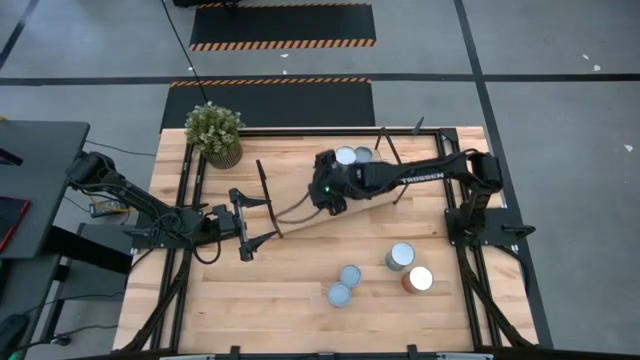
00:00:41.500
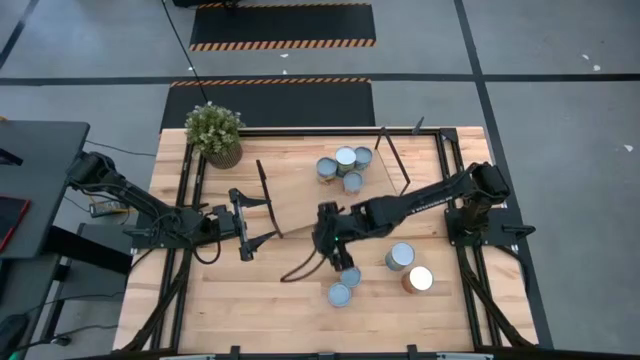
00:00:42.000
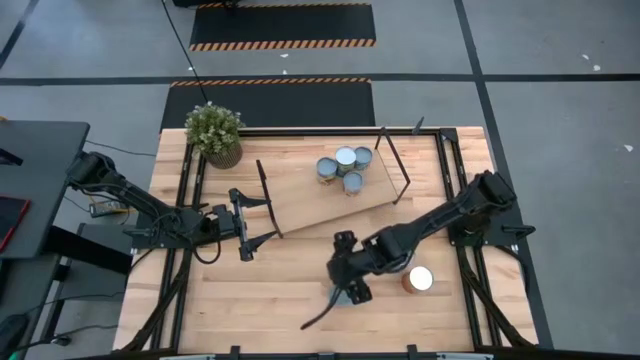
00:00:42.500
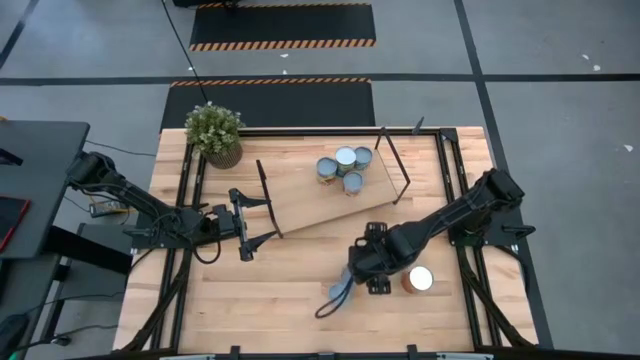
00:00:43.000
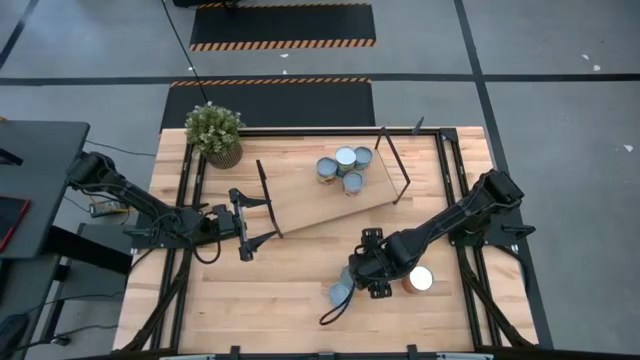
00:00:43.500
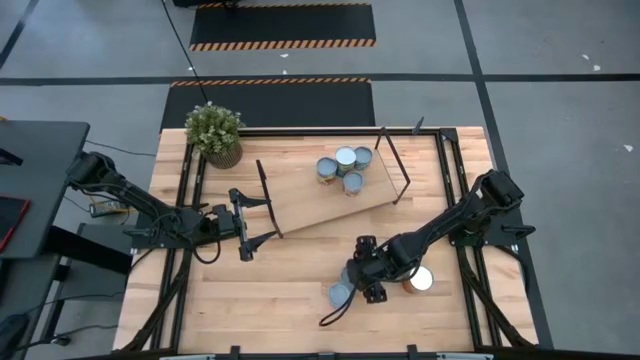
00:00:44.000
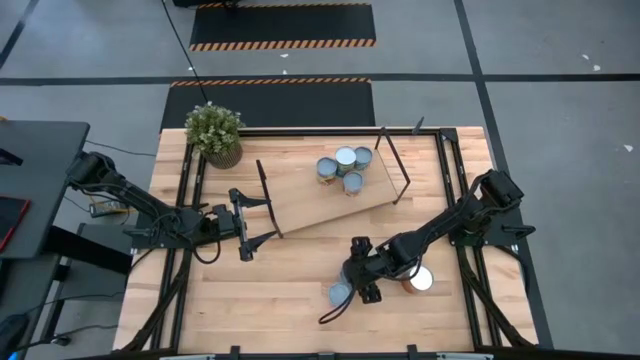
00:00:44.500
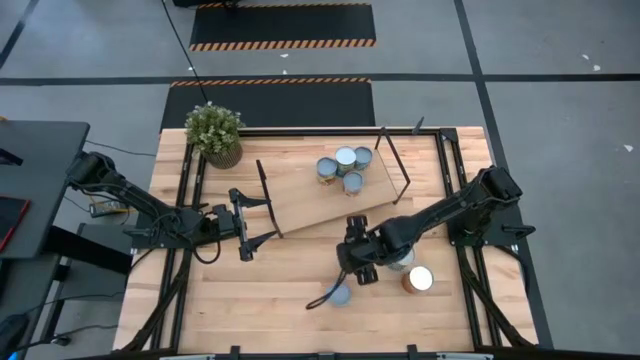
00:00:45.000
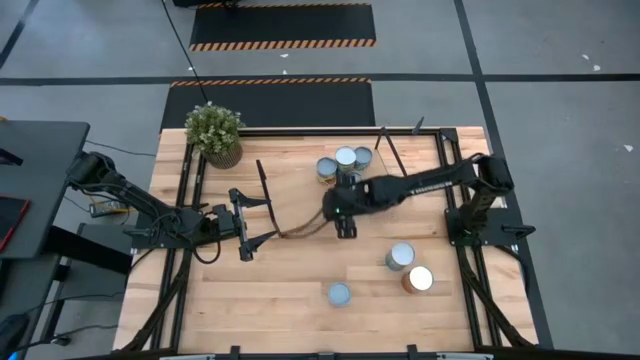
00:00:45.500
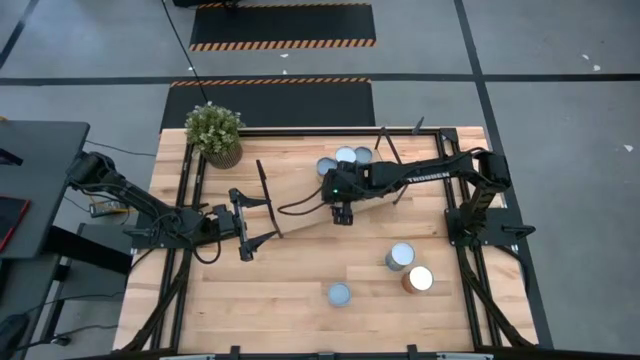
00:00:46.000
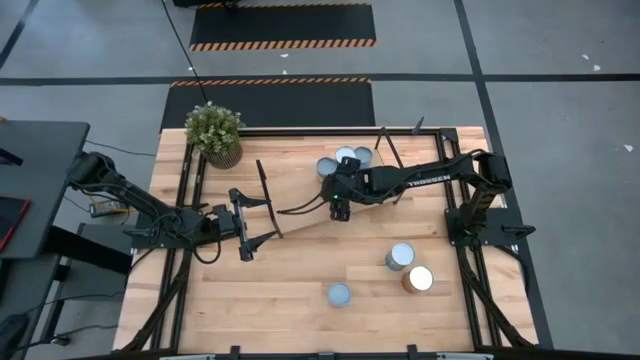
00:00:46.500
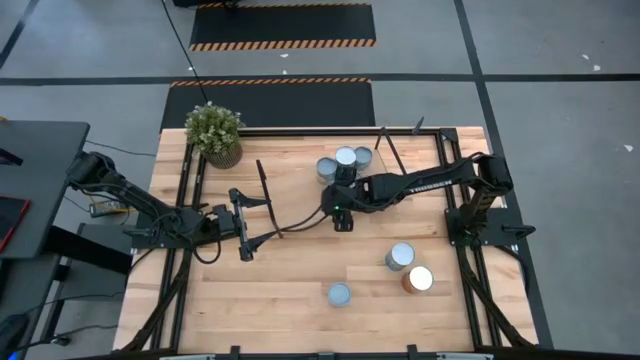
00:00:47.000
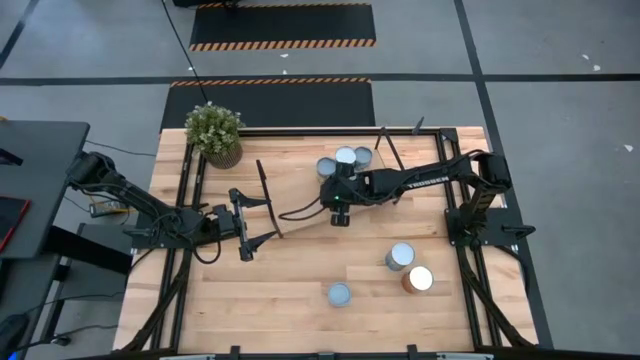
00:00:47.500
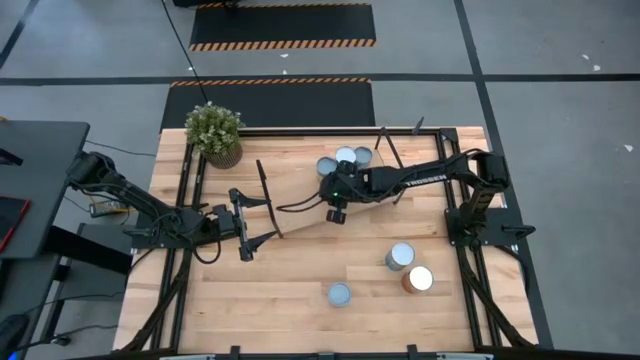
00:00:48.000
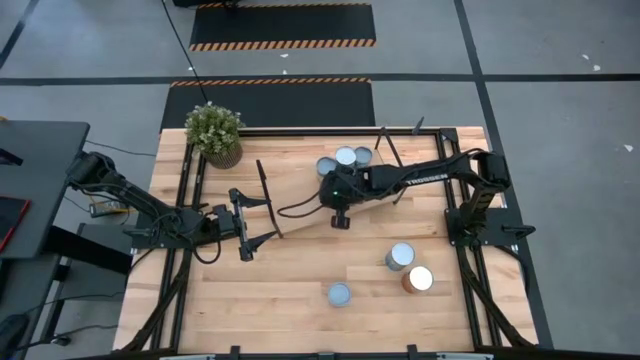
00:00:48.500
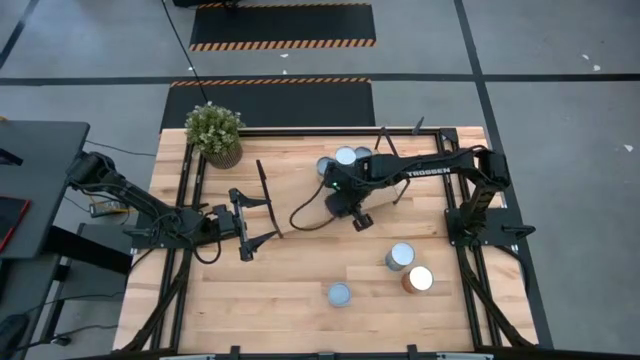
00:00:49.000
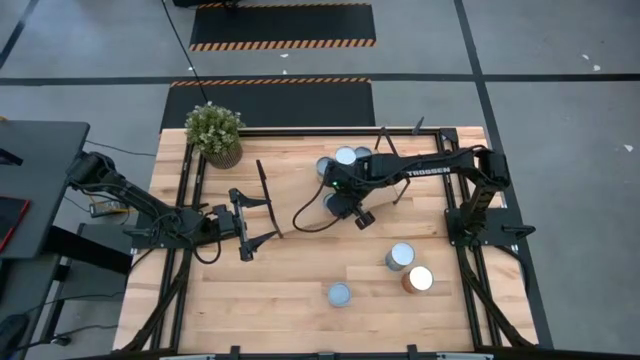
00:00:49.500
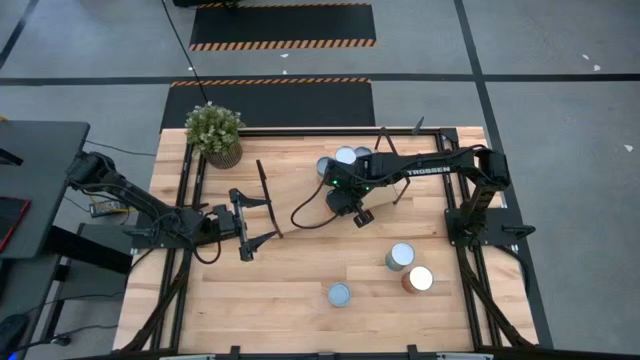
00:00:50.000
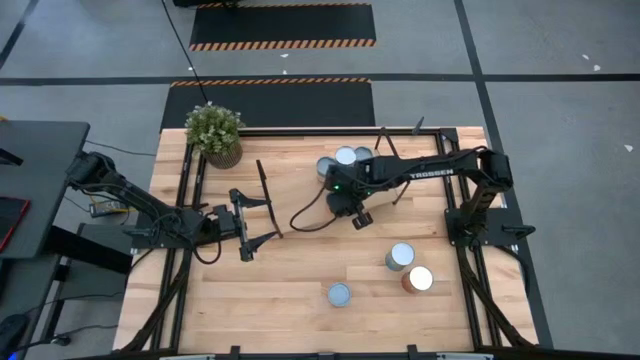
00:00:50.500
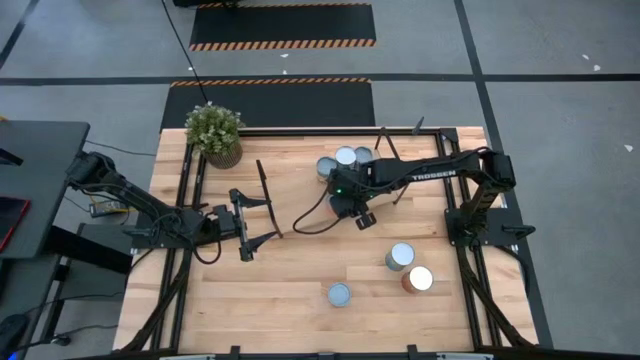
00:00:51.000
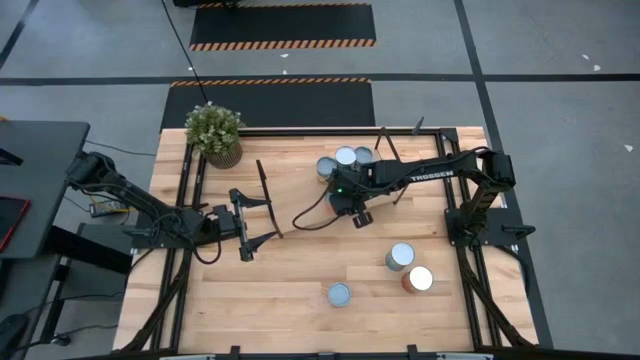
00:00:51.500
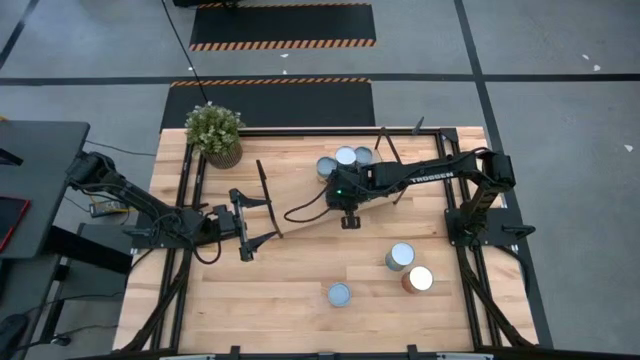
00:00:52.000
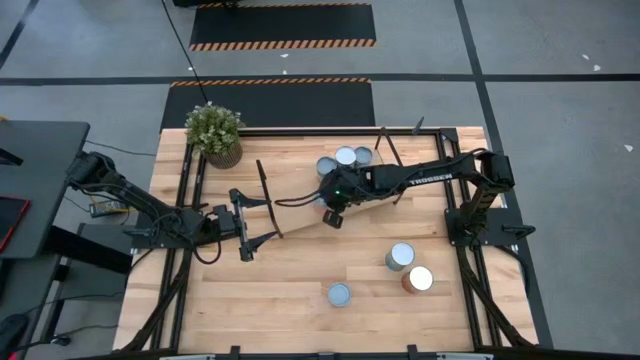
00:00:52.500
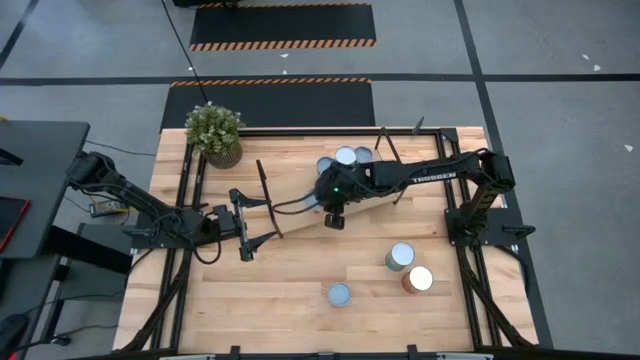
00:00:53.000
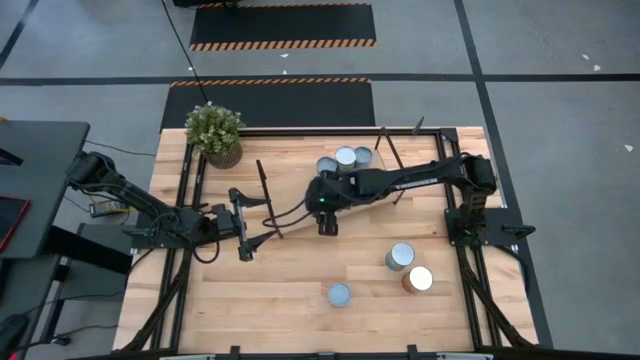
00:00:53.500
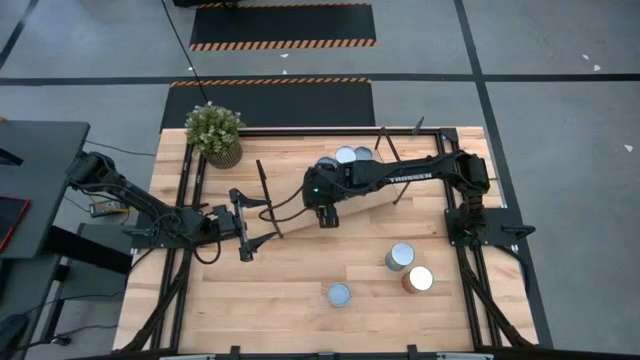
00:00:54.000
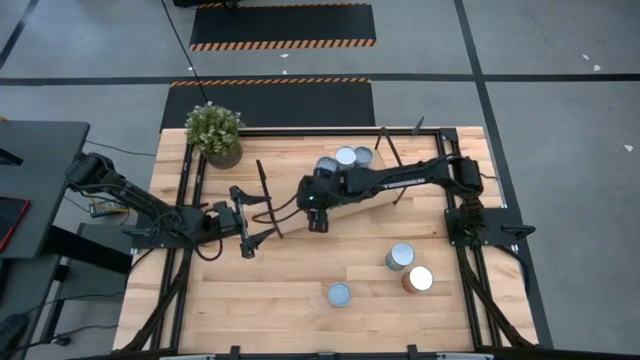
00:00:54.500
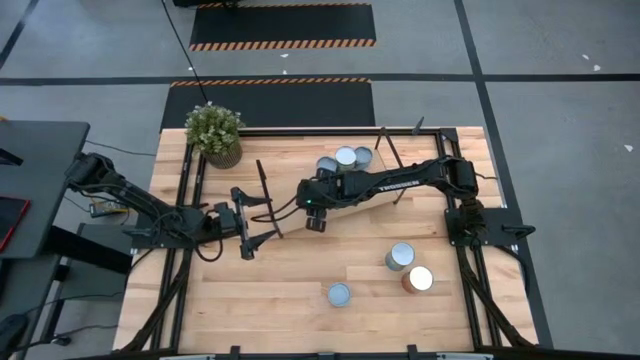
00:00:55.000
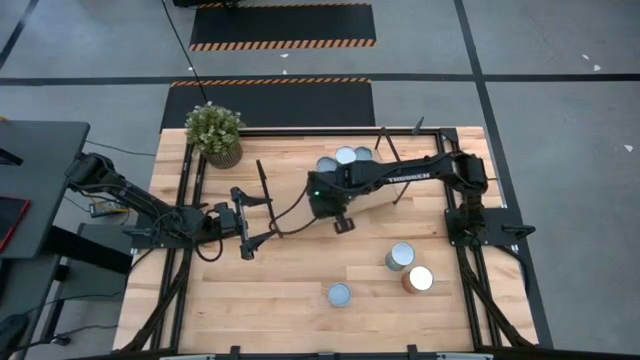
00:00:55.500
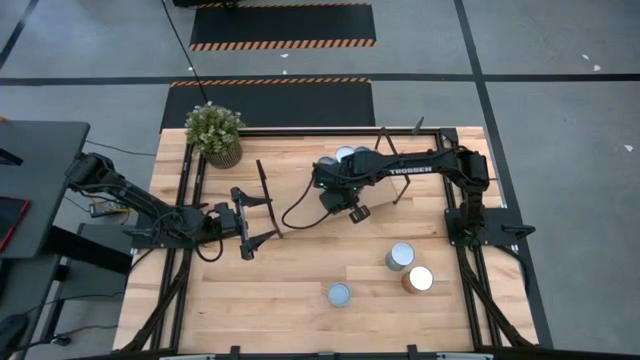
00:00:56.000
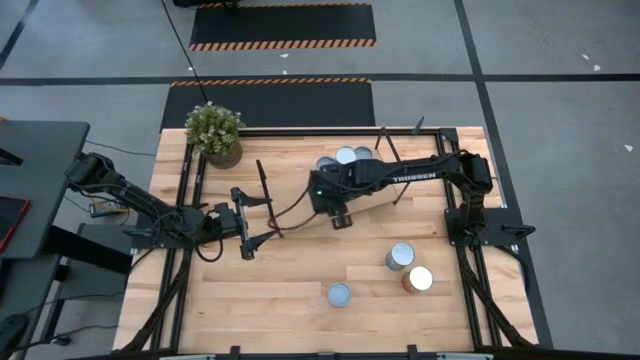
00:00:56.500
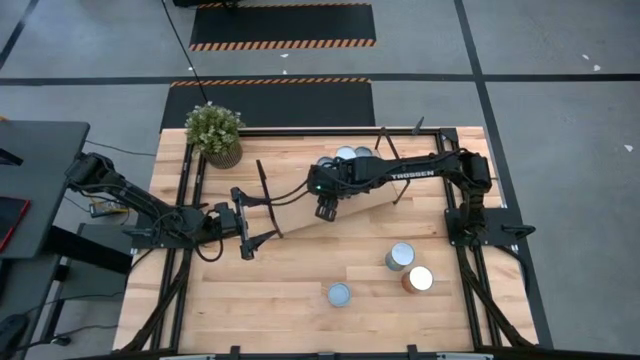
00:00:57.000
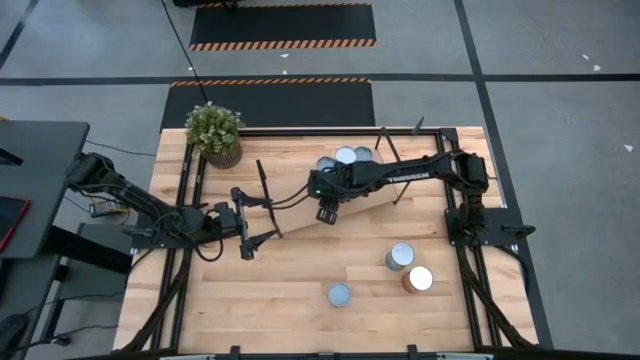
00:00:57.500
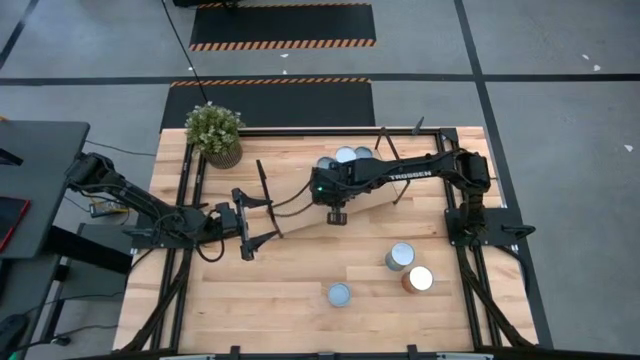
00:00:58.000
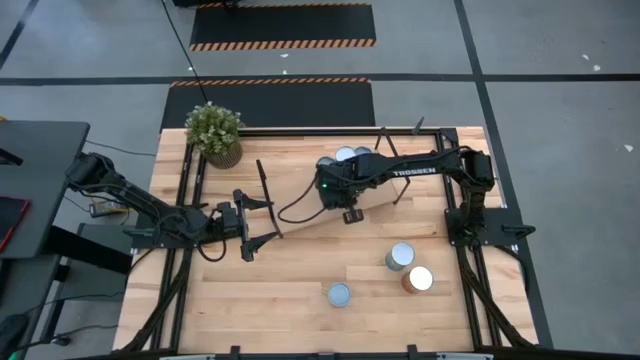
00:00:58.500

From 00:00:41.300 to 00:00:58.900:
Task: Pick and place cans onto a shelf
Put the orange can on the shelf aligned with the other green can

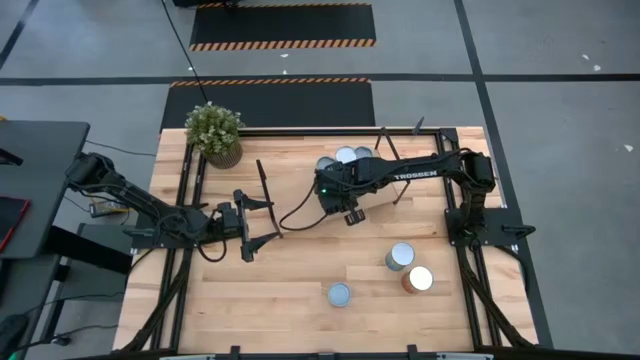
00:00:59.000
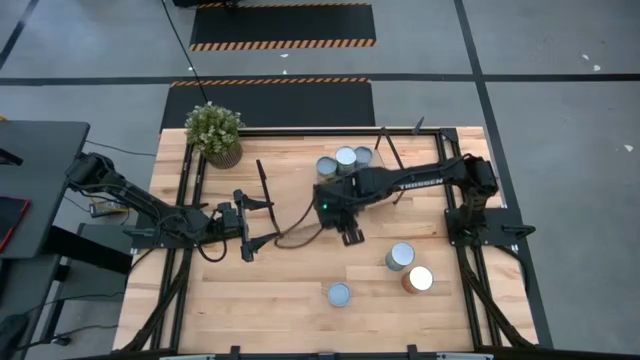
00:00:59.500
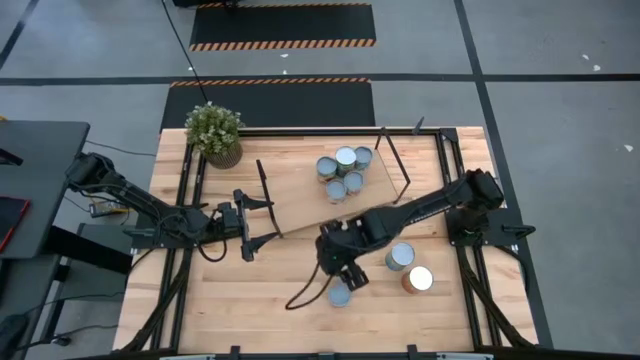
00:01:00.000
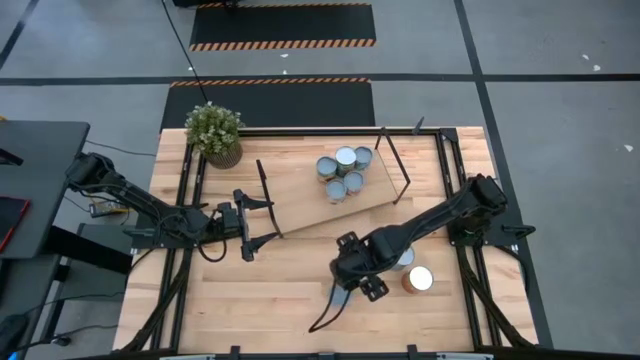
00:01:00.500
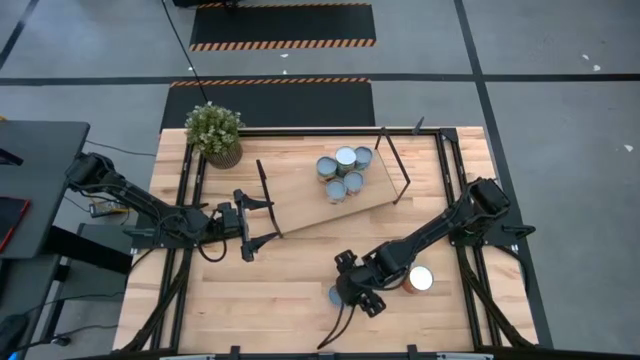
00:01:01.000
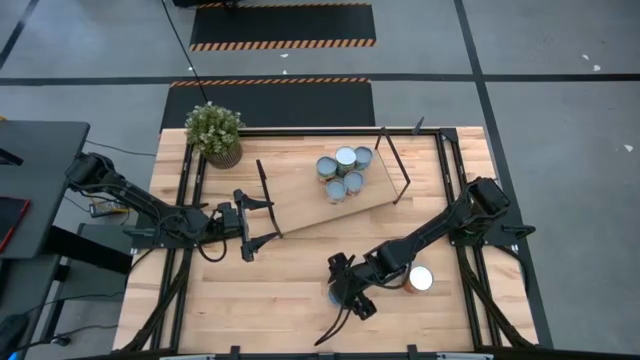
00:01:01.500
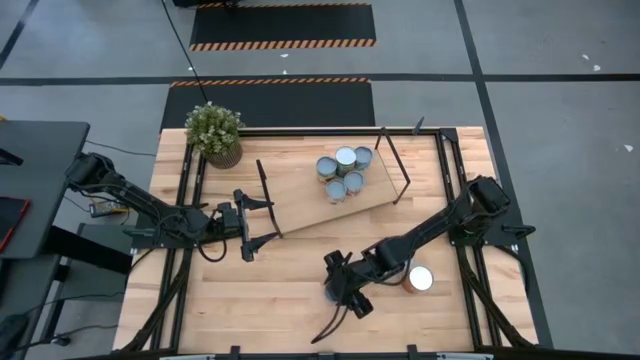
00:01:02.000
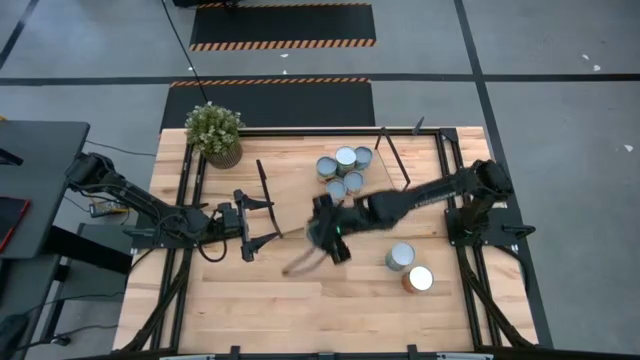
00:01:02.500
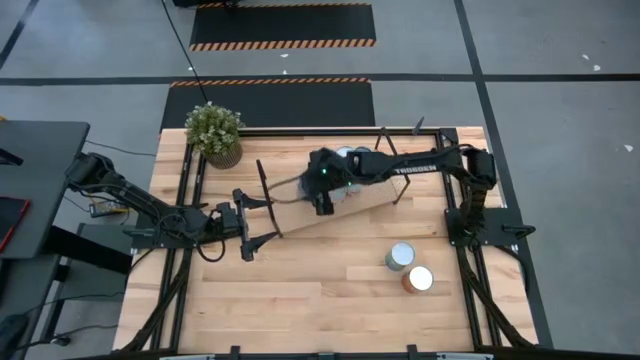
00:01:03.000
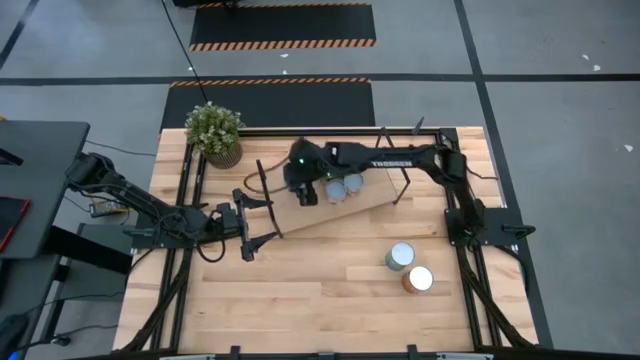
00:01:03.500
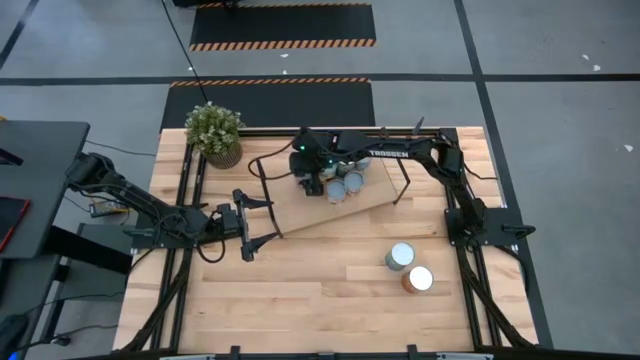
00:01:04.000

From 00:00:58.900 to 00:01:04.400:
Put the pink can on the shelf
